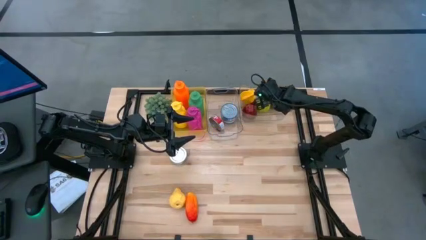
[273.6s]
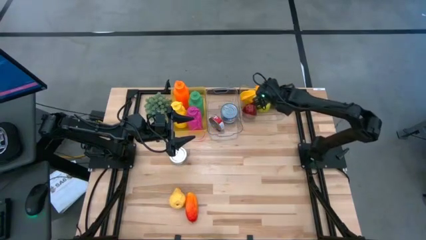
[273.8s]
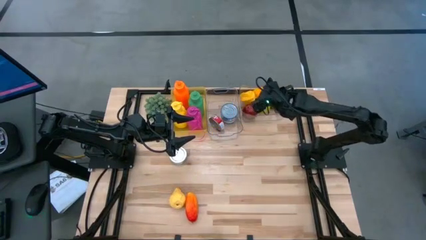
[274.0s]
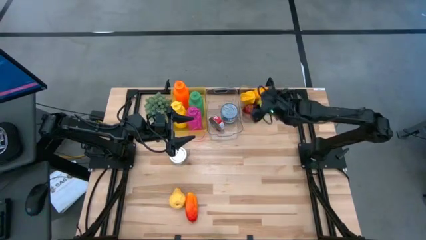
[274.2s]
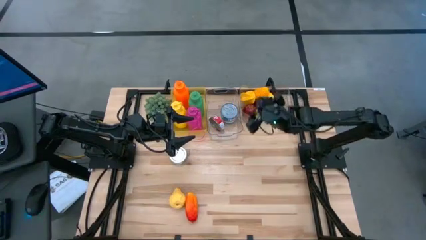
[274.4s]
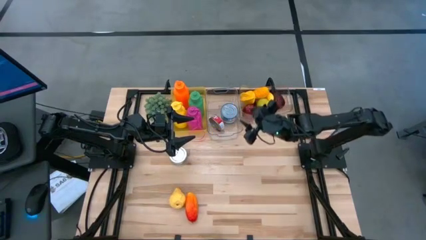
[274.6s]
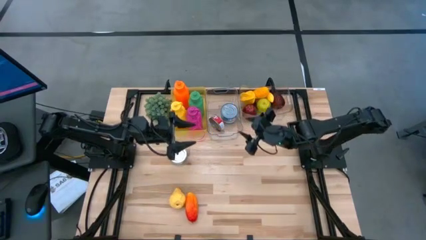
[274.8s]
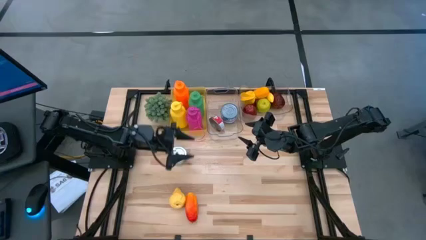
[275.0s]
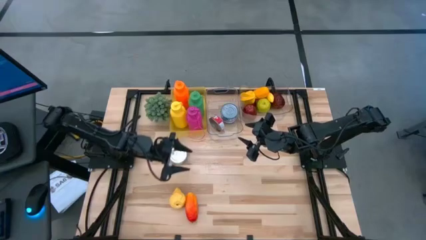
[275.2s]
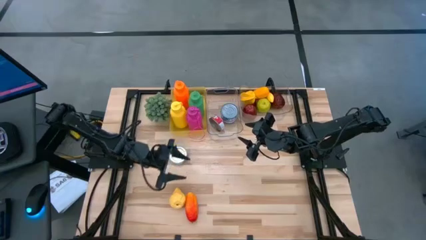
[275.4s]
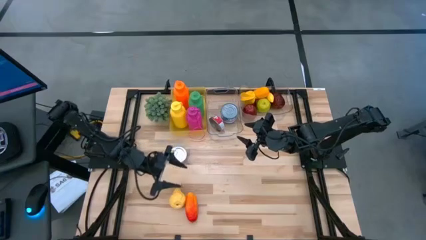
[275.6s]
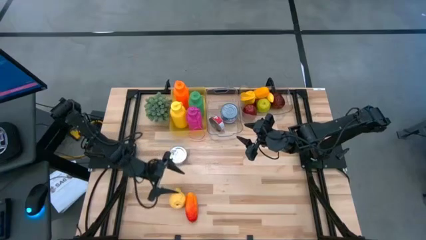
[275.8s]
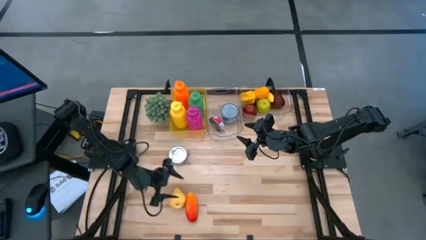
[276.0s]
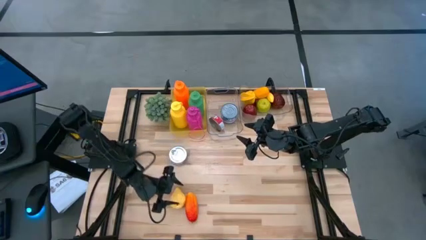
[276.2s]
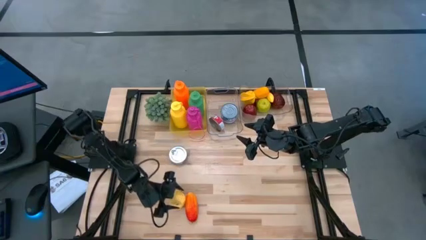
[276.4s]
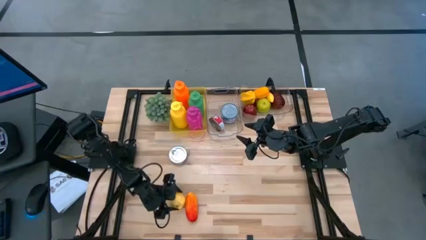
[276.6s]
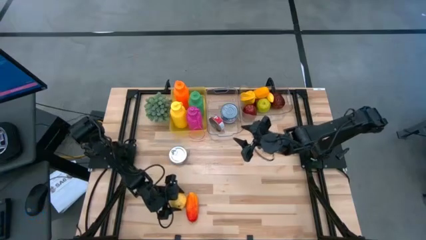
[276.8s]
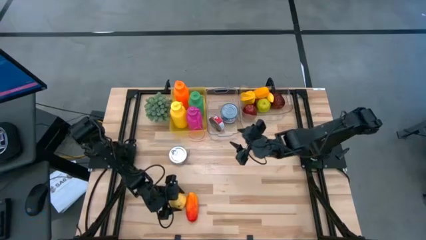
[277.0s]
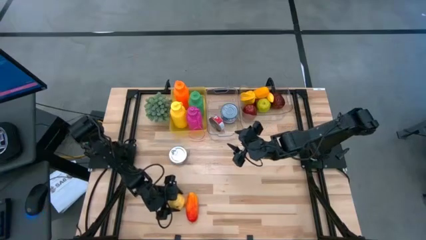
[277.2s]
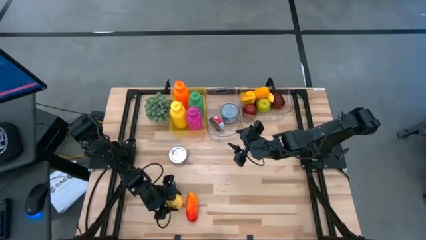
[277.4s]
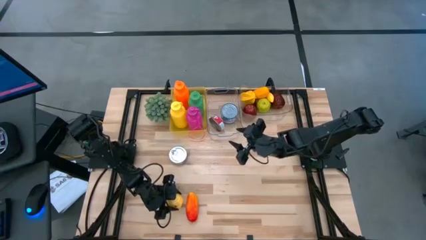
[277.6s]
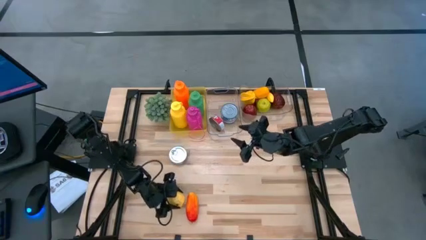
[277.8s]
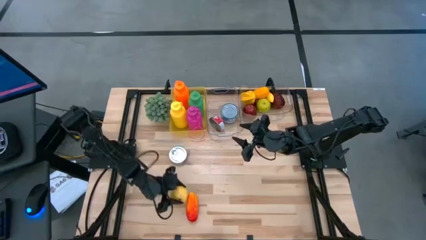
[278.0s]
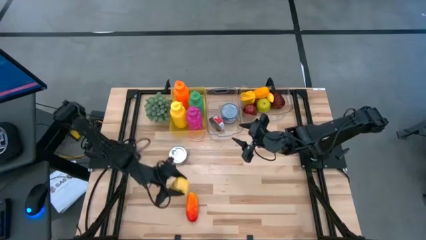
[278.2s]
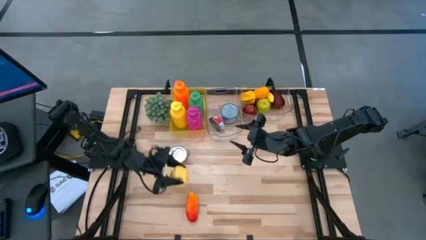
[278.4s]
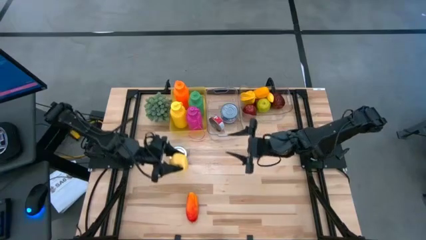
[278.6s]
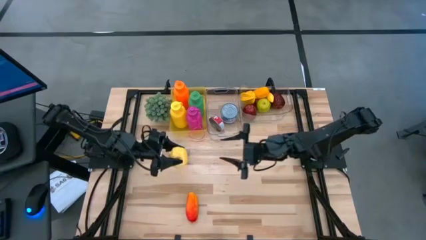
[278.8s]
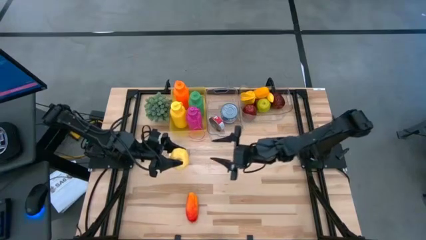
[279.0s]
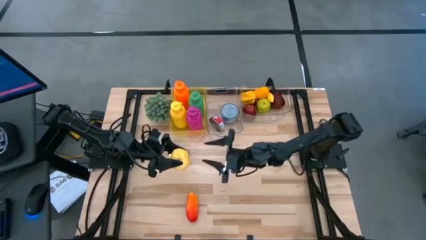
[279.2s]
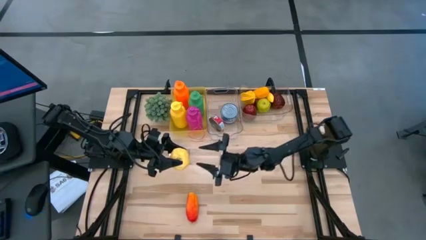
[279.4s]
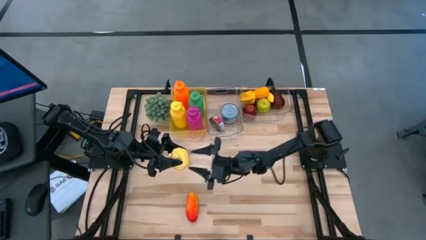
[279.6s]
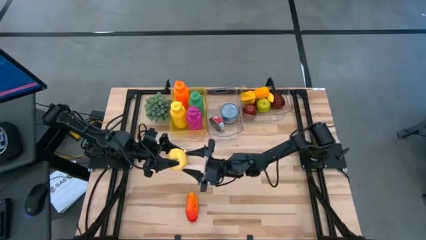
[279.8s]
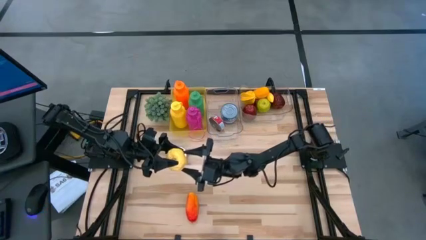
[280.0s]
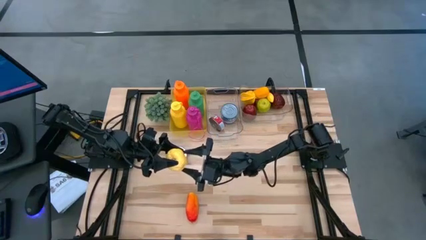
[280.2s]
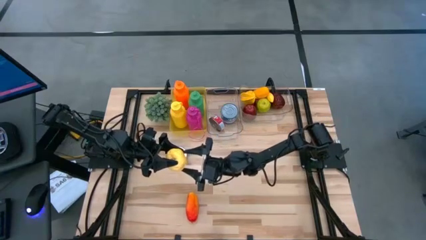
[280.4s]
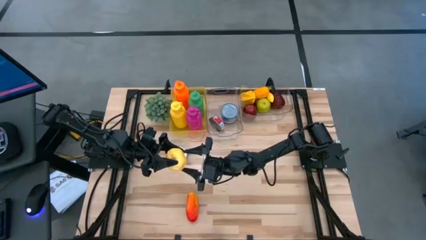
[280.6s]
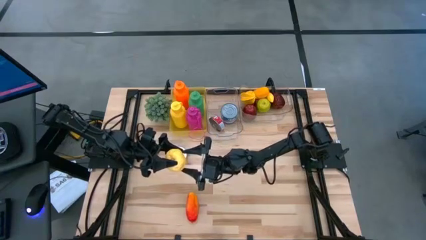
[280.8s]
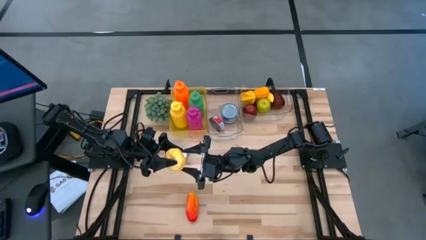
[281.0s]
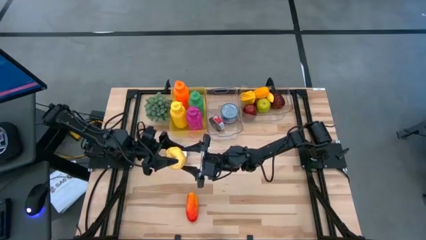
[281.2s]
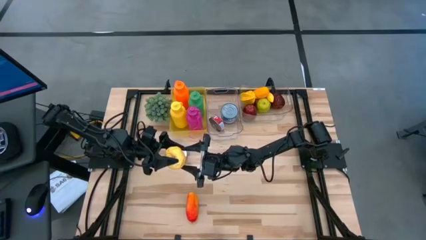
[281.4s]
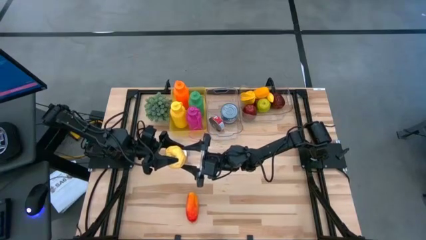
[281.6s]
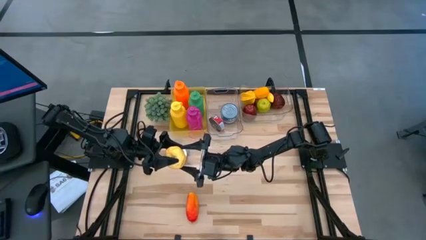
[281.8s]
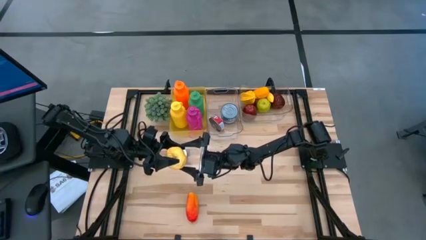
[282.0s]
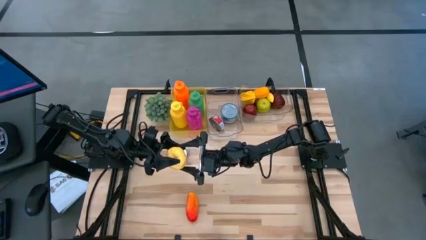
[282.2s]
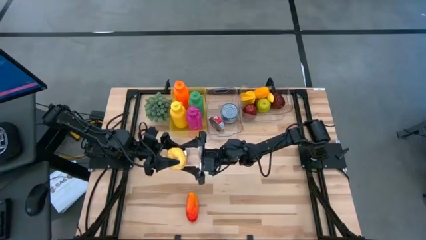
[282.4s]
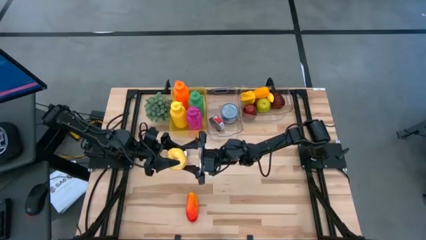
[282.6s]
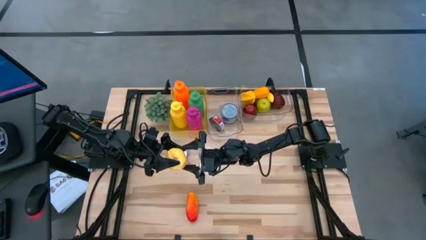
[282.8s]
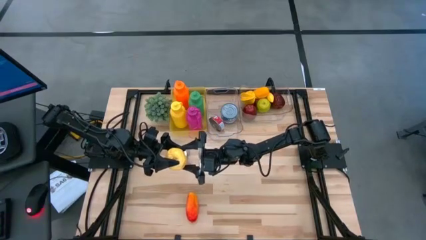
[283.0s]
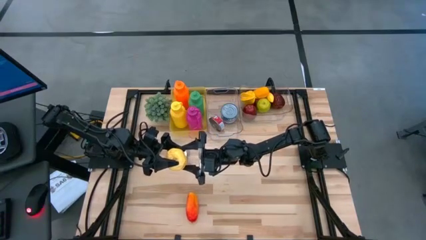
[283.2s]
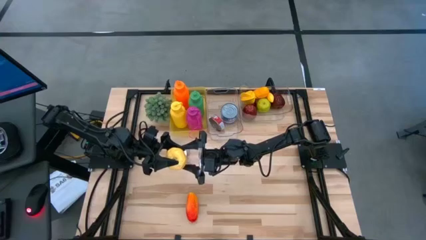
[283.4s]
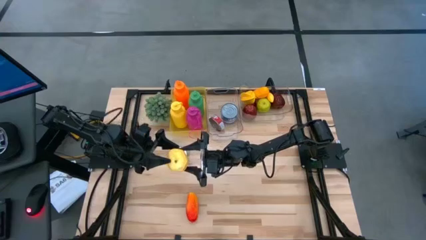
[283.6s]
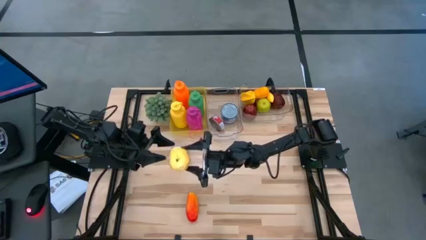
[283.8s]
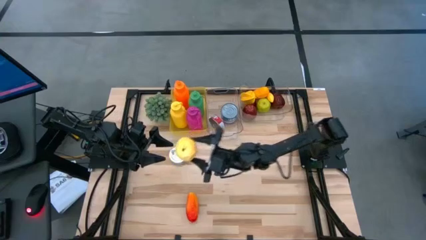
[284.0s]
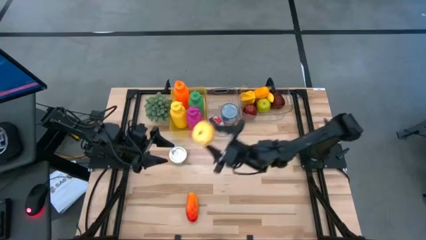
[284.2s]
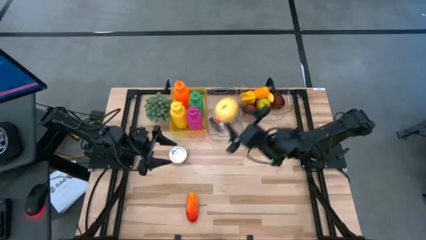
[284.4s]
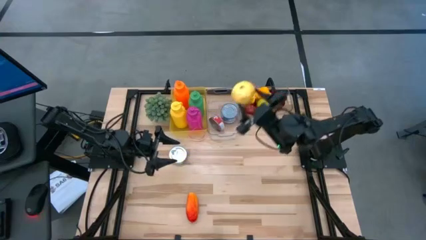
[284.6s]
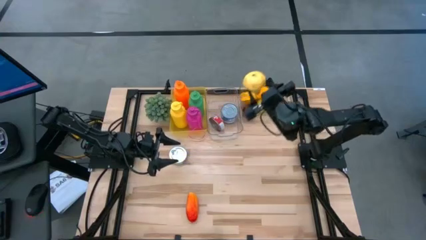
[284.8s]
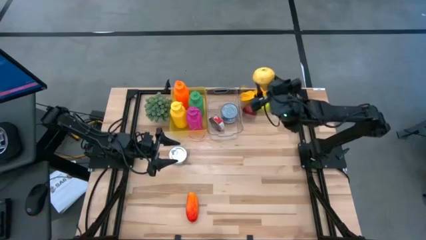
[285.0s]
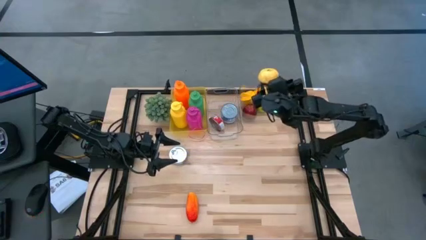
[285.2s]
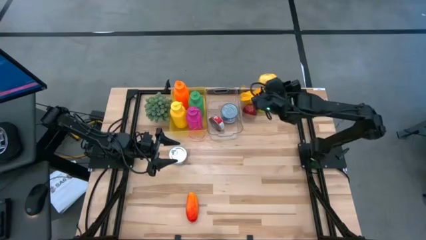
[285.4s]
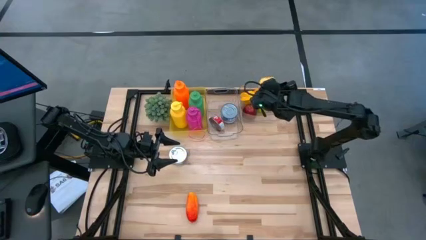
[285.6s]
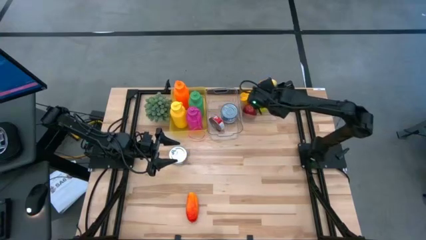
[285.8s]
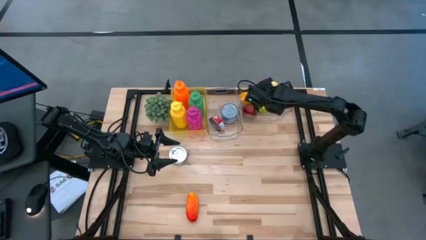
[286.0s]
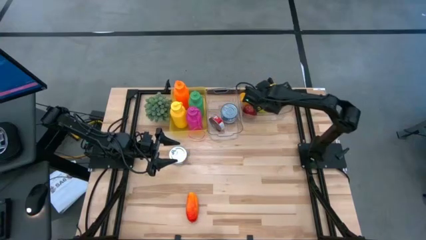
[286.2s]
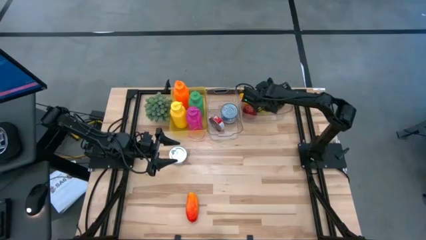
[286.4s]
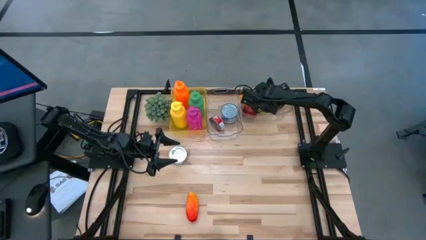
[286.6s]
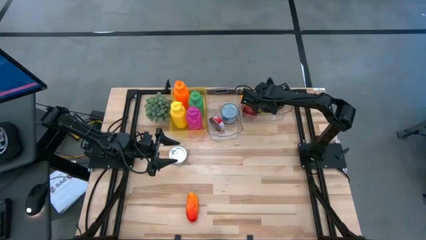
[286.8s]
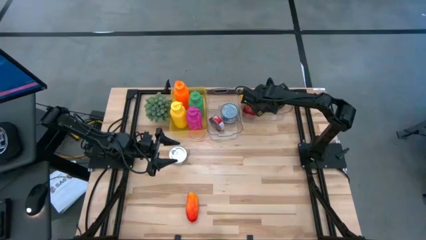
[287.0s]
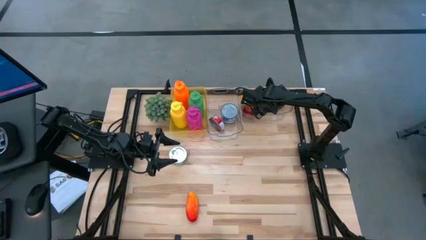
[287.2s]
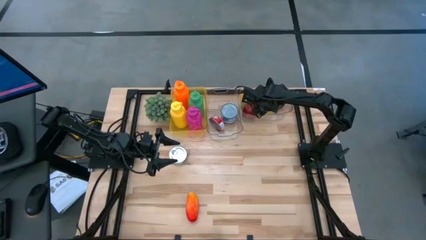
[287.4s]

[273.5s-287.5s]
Task: Pick & Place Food Item
Put the yellow pear into the right transparent bin
